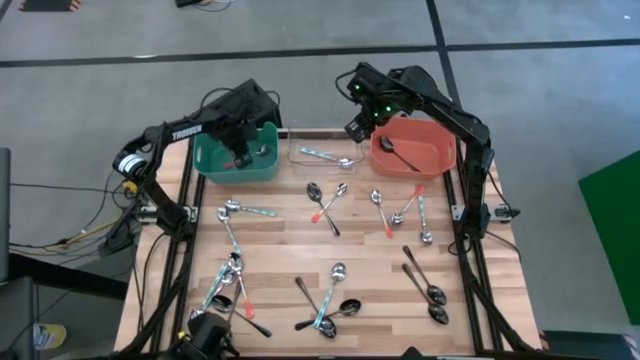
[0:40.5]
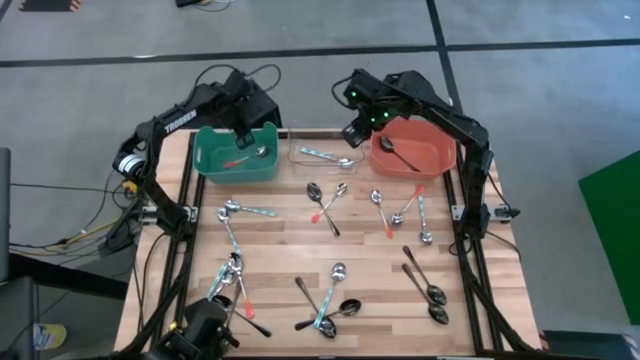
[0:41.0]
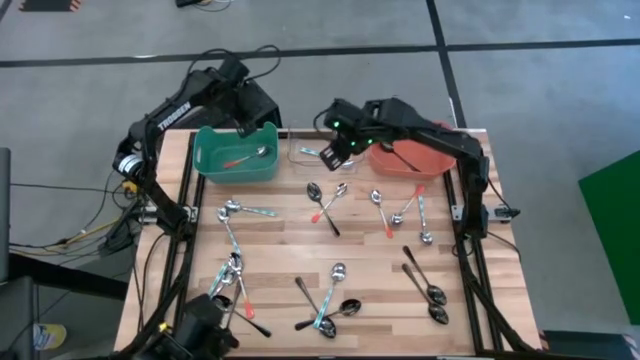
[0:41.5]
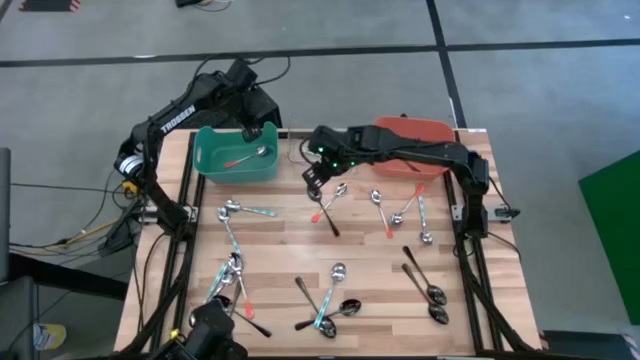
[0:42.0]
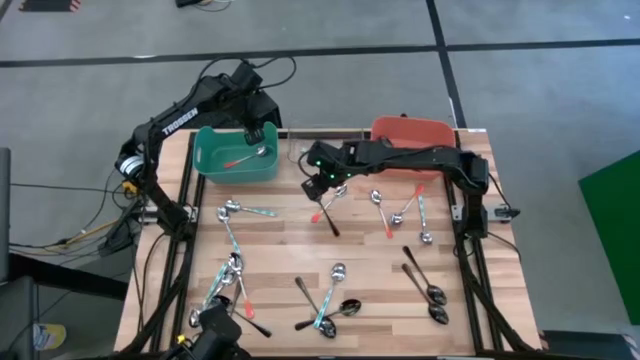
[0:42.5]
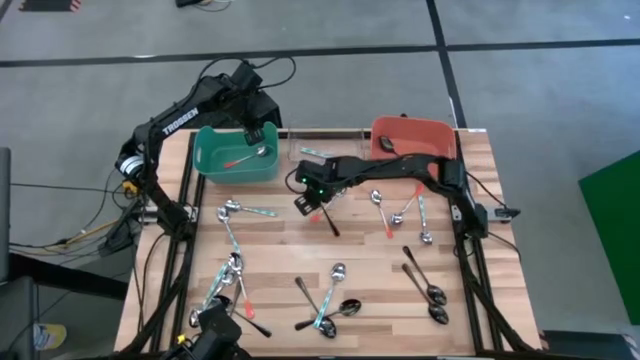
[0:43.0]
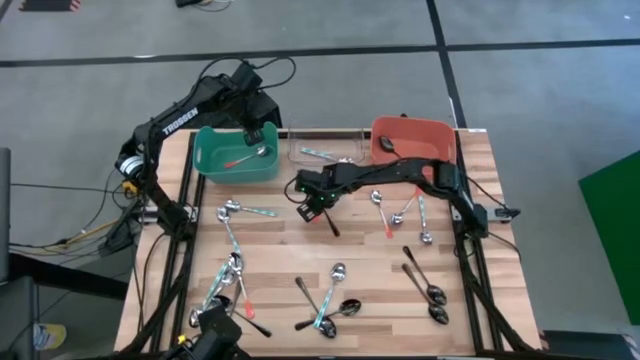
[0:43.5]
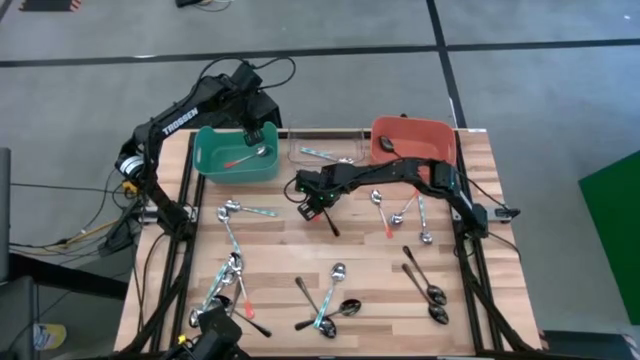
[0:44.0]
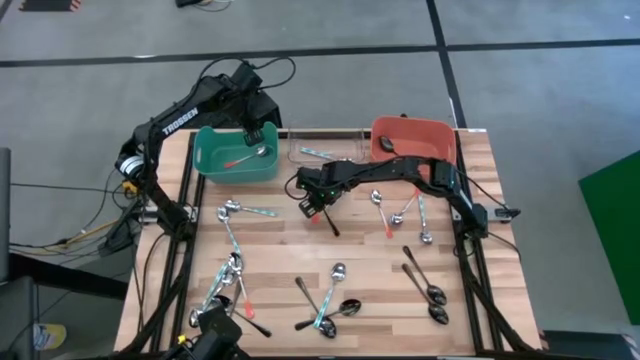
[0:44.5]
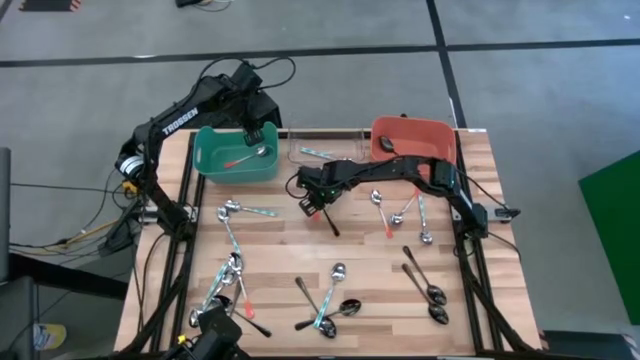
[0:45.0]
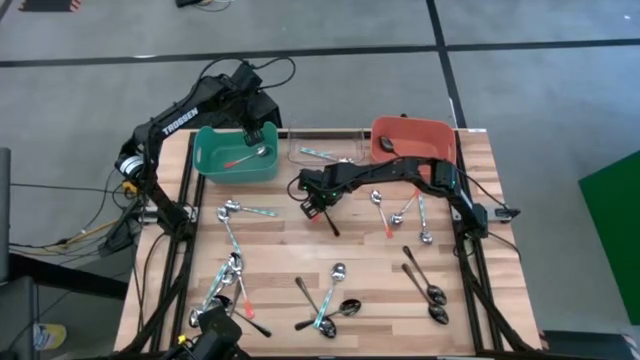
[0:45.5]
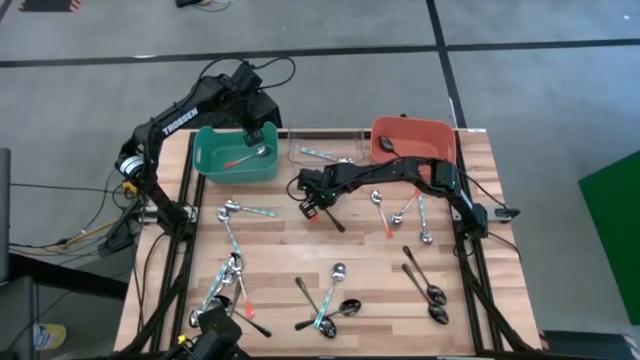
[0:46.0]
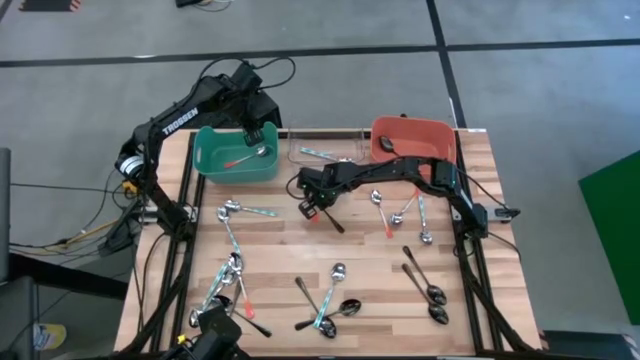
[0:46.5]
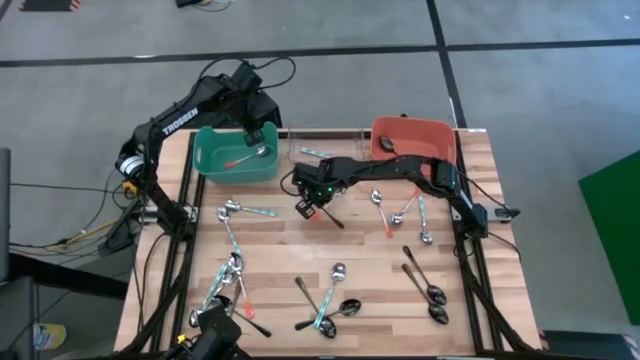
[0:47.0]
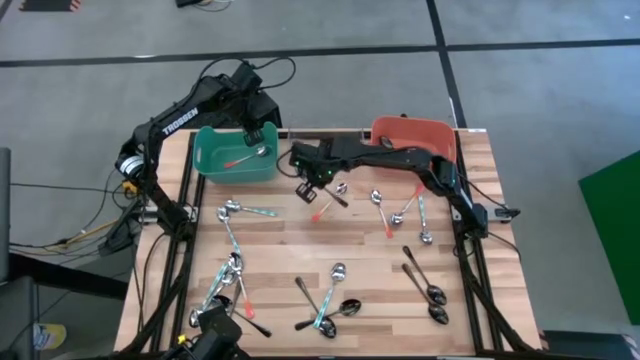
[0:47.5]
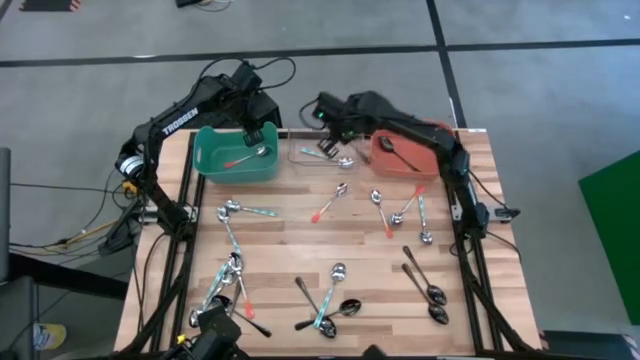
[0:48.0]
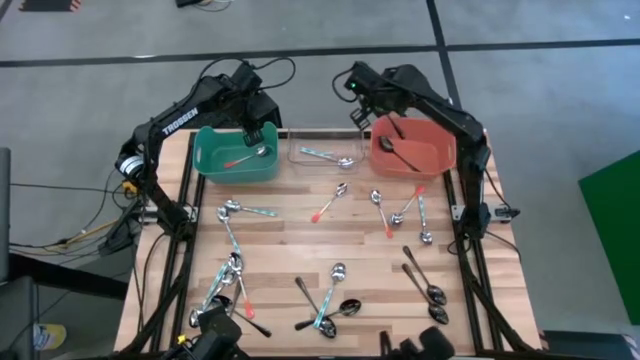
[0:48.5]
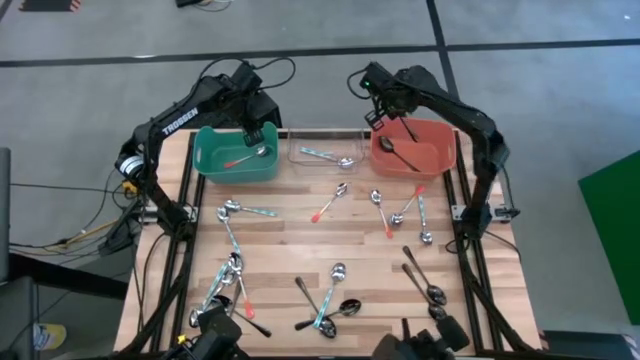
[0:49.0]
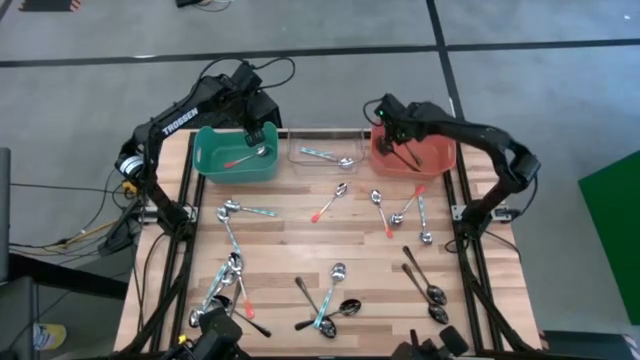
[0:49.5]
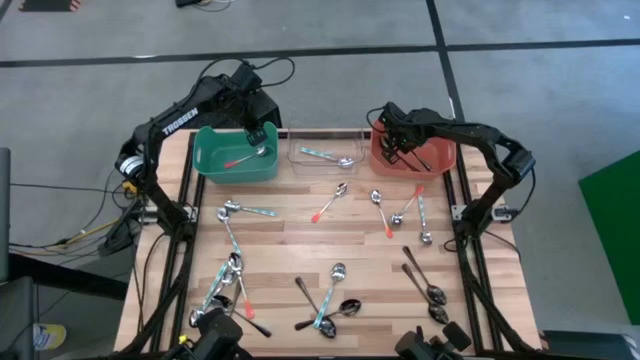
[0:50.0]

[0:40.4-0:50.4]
Task: Sort silverware by color (type)
Put the black spoon into the orange bin

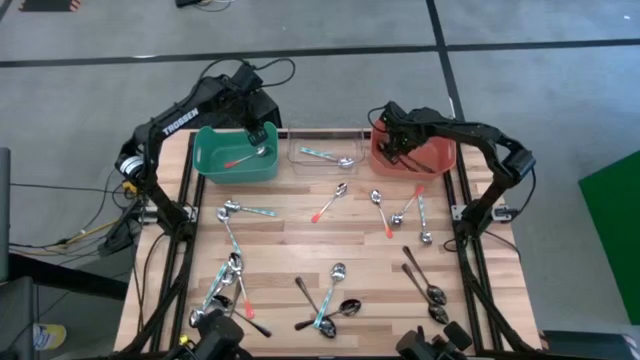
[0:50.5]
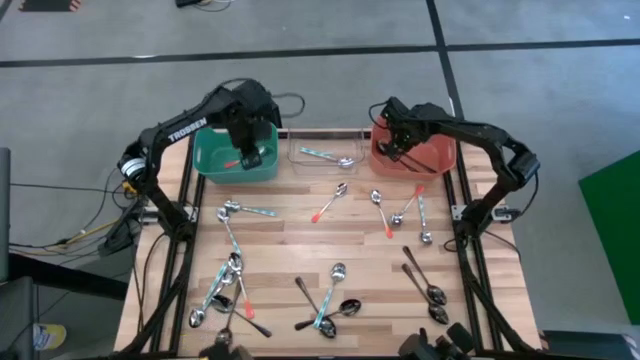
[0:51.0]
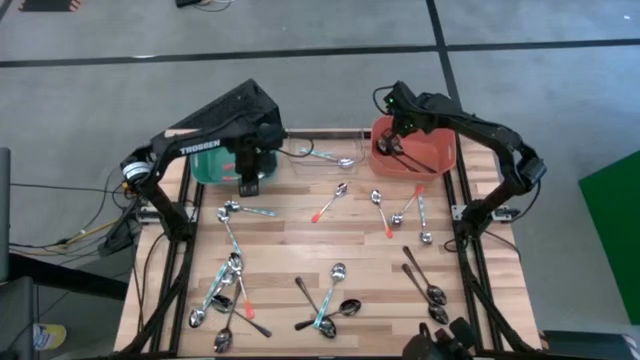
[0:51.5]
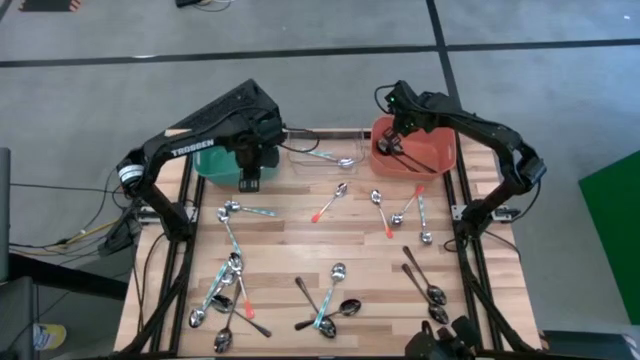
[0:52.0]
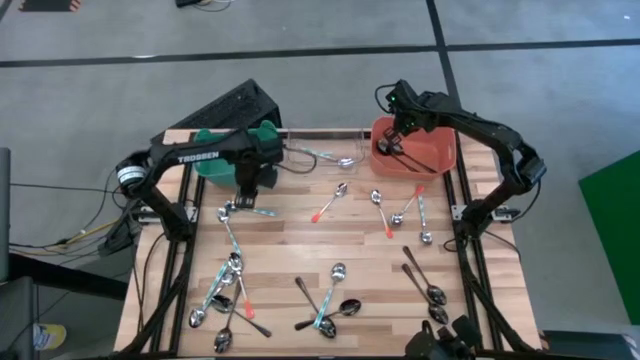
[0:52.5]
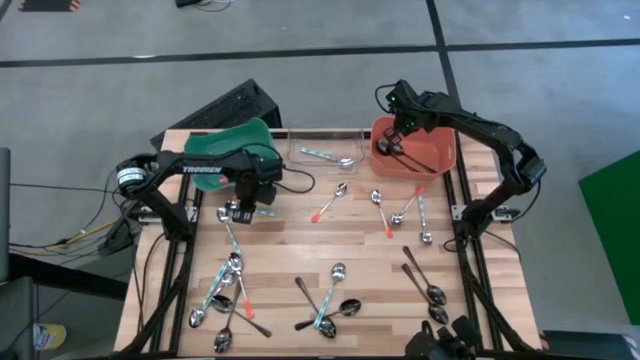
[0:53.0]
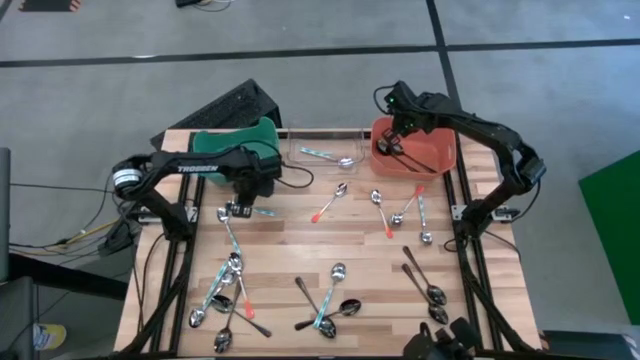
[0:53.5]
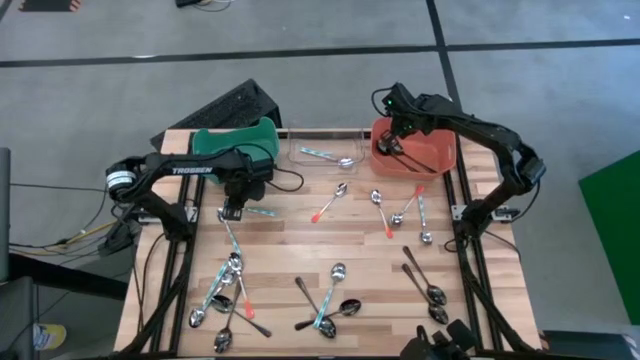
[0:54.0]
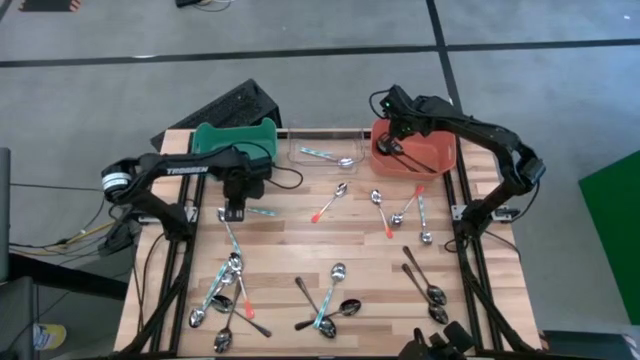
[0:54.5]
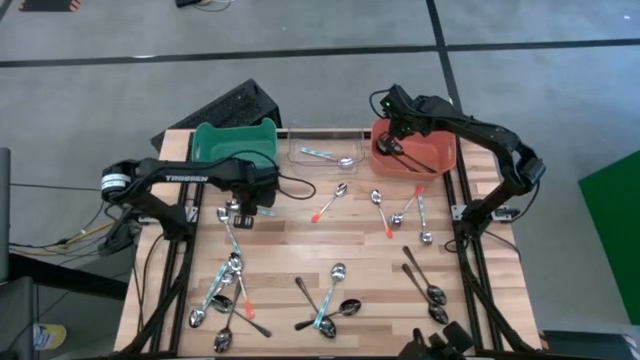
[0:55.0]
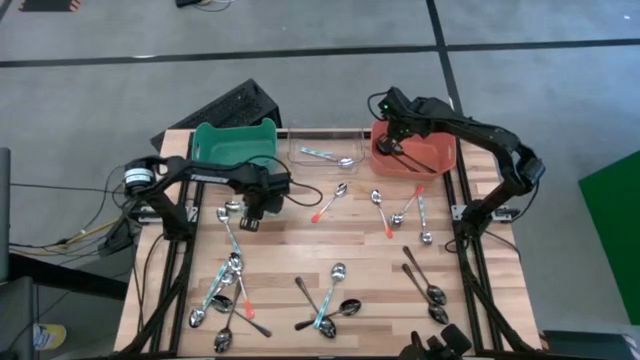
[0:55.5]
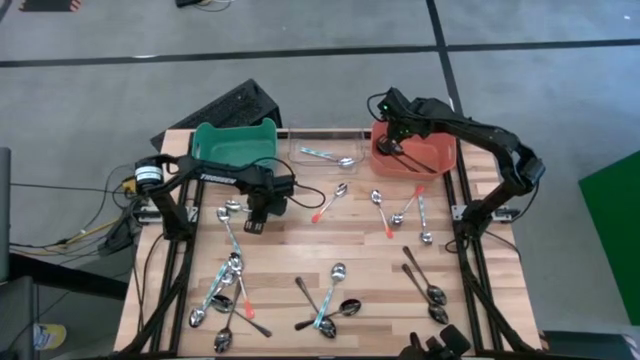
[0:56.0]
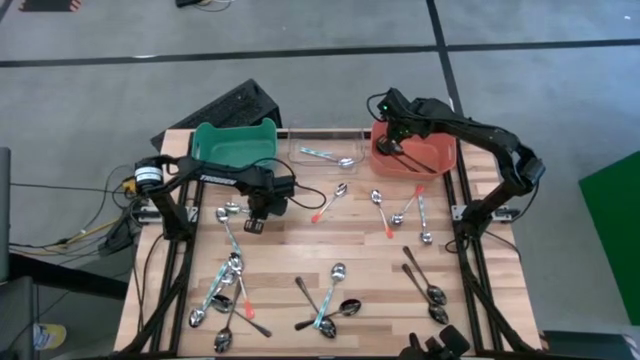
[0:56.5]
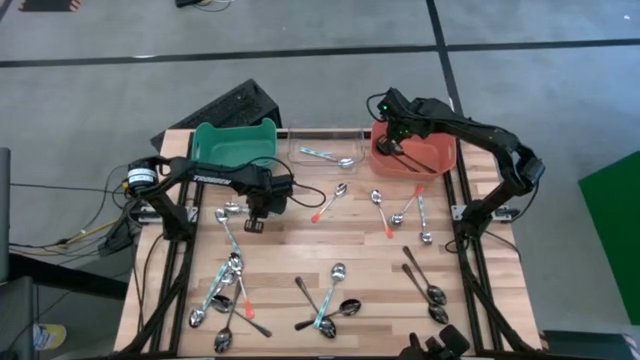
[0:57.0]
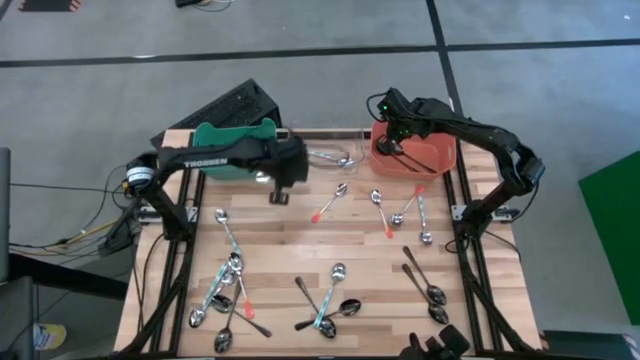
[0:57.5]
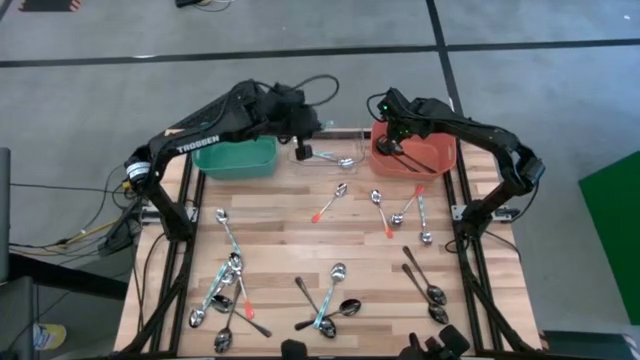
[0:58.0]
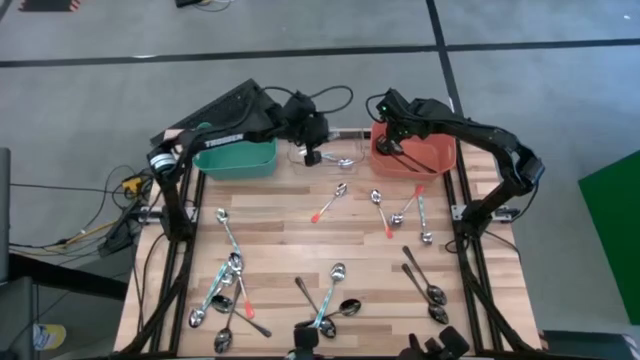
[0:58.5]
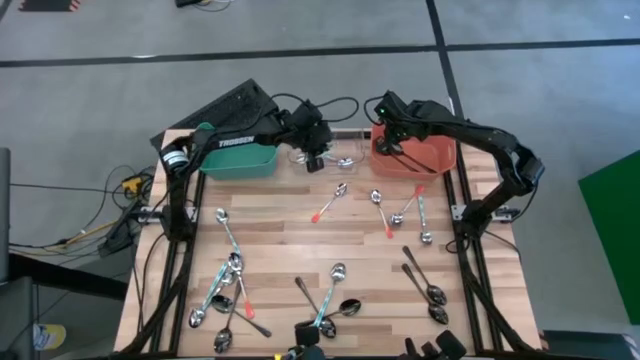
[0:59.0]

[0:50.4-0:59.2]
Put the blue spoon into the transparent bin

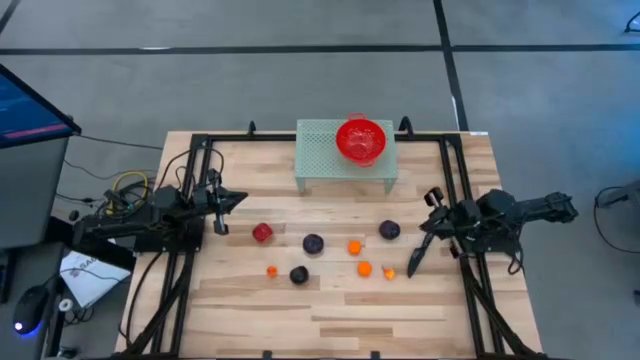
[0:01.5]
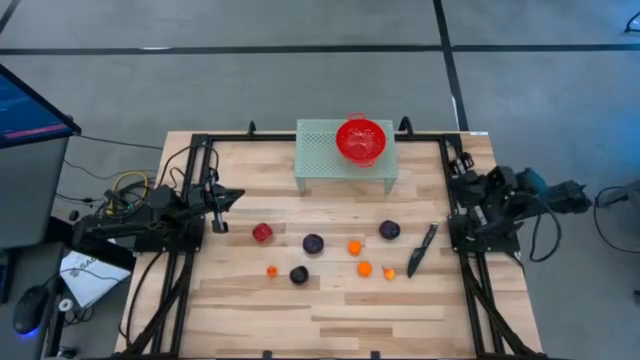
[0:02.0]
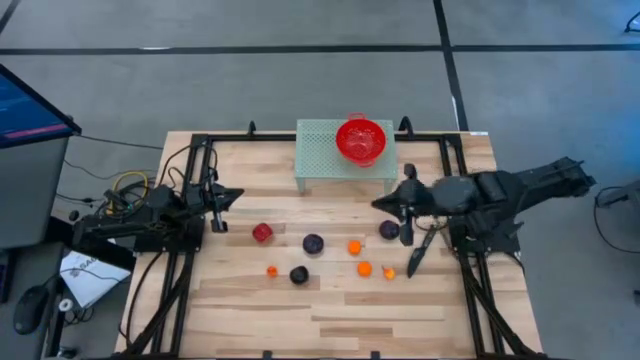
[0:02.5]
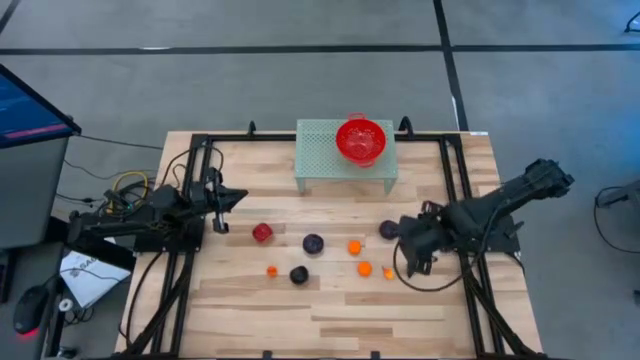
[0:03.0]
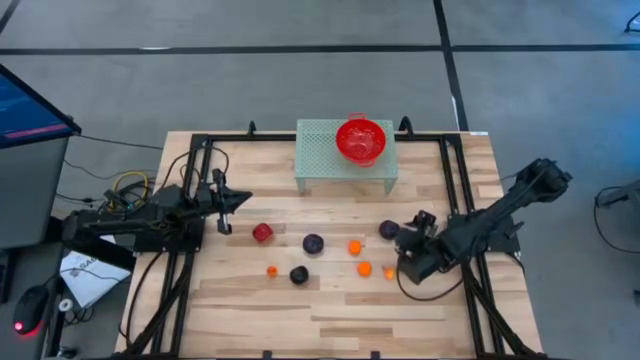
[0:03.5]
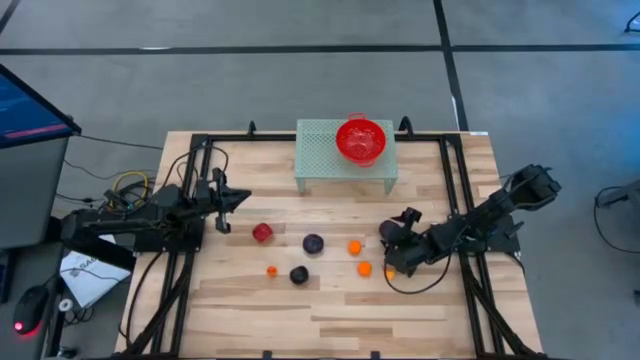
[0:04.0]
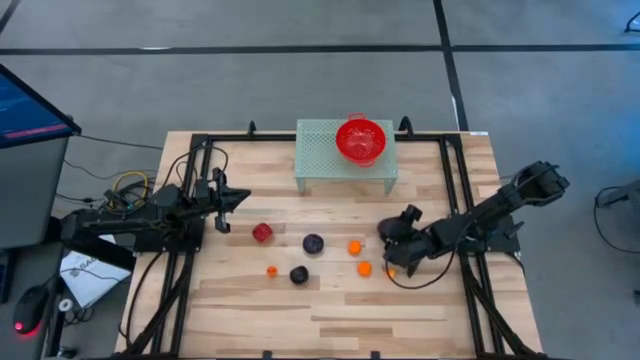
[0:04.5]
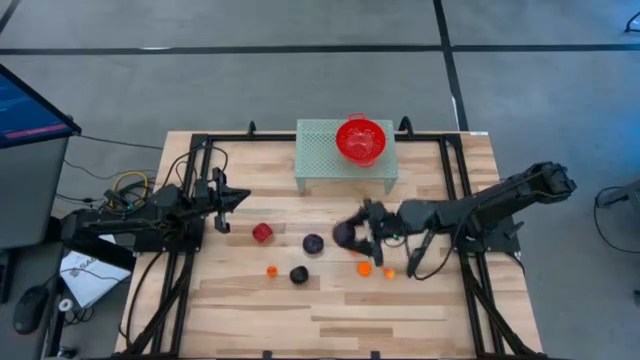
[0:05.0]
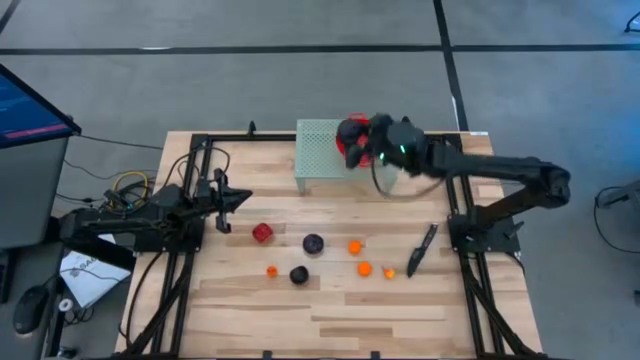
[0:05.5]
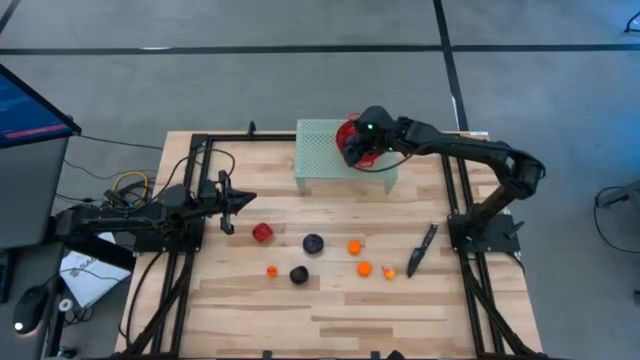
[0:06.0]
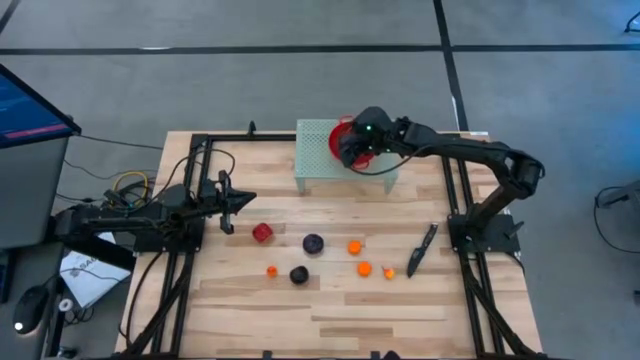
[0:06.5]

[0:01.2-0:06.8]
Task: Pick & Place Fruit
Put the top black plum into the red strainer bowl on the shelf
